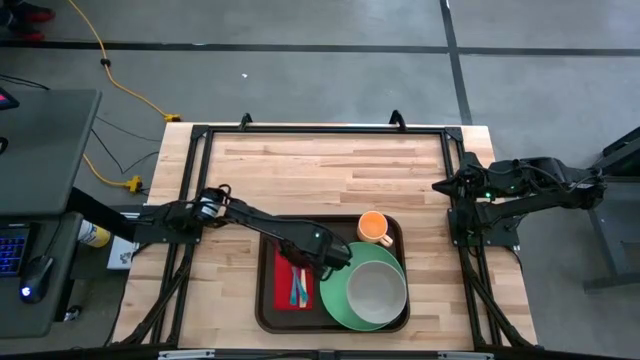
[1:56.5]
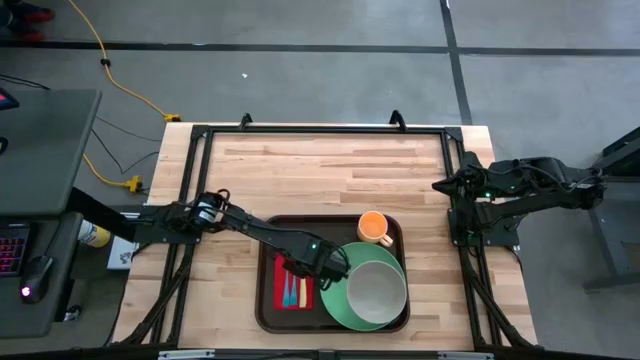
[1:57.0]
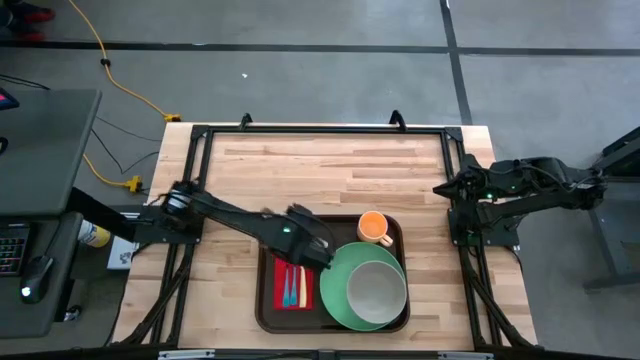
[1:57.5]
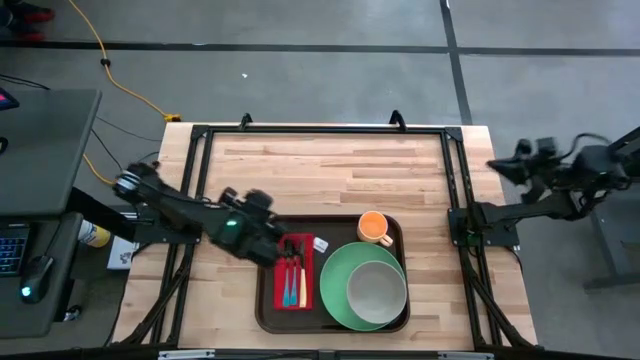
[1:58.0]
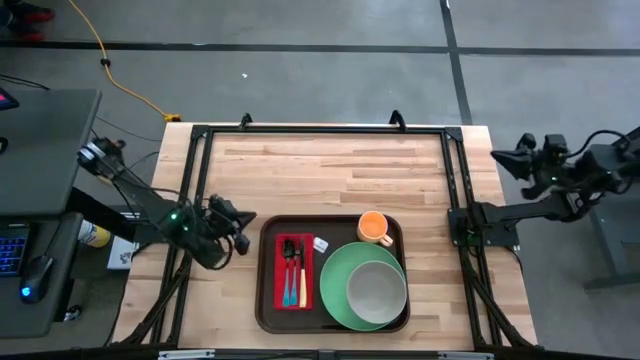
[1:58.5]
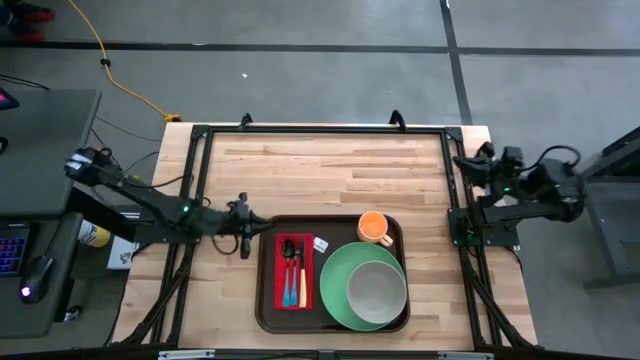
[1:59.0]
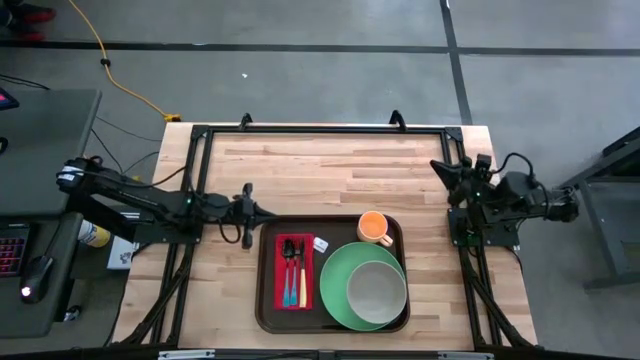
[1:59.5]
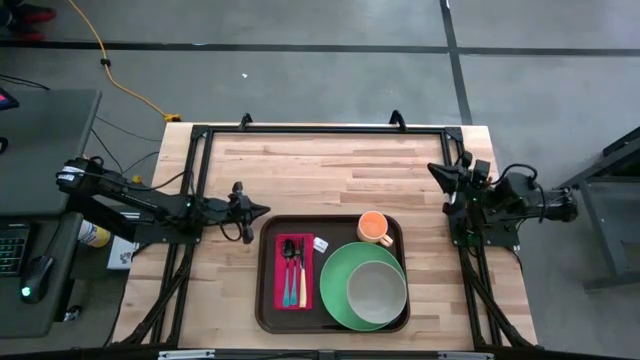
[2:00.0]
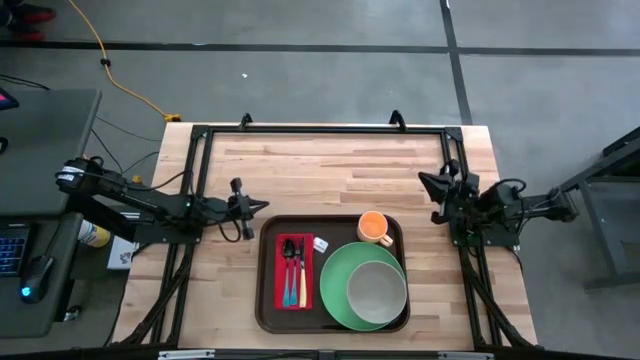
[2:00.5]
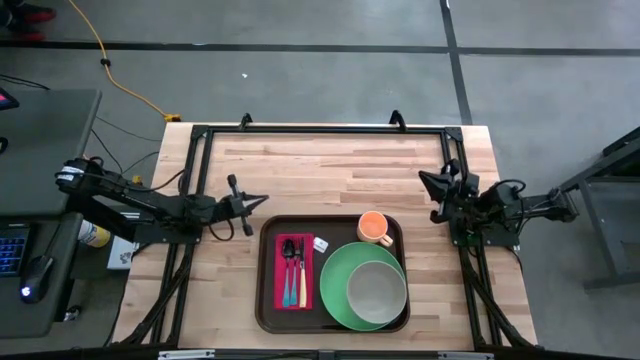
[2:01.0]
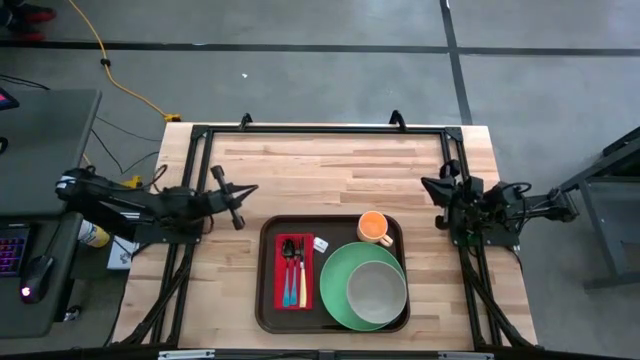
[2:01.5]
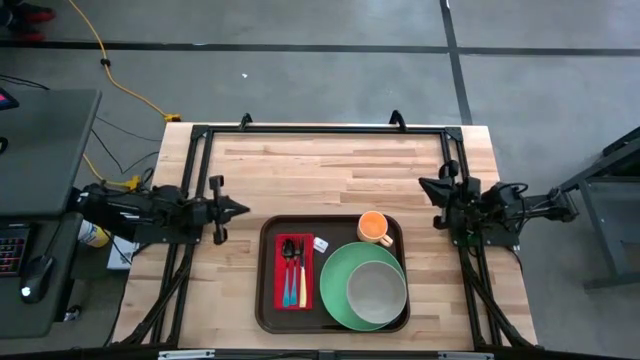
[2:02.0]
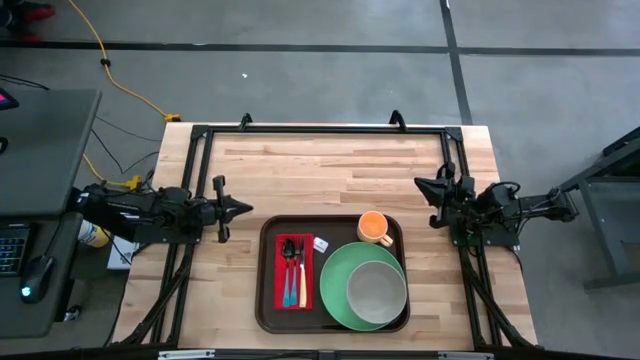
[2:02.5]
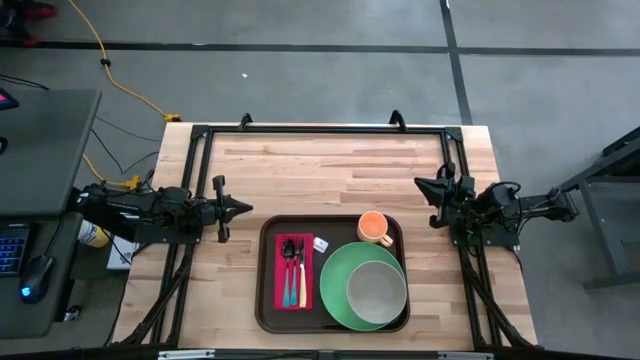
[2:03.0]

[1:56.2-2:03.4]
Task: Set up tray
Return to Home Position

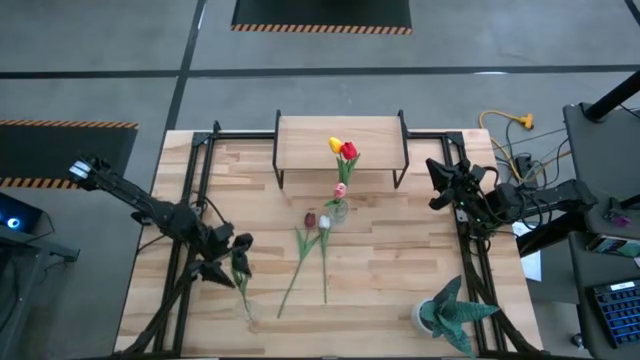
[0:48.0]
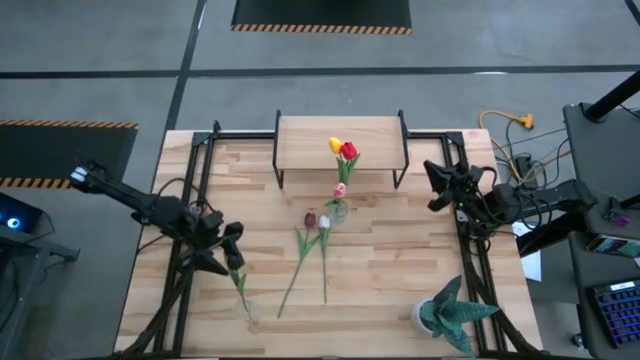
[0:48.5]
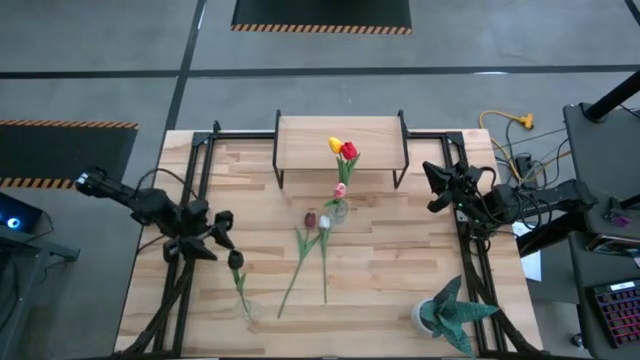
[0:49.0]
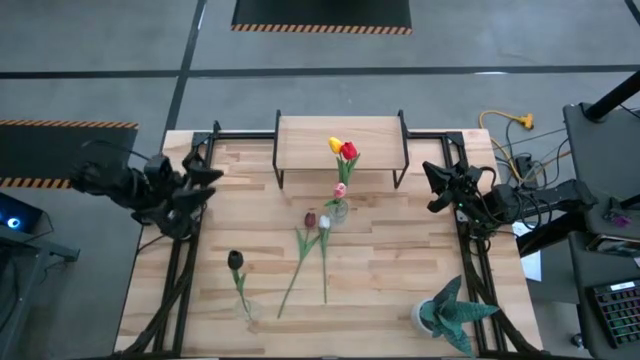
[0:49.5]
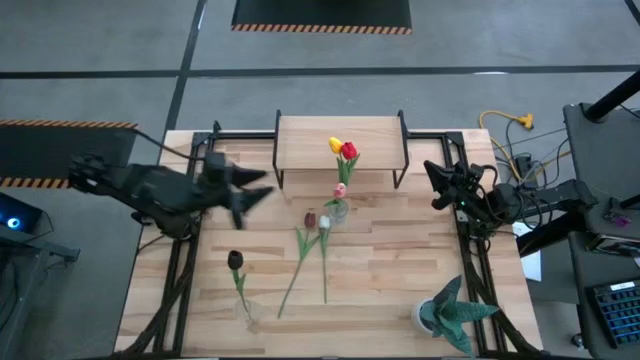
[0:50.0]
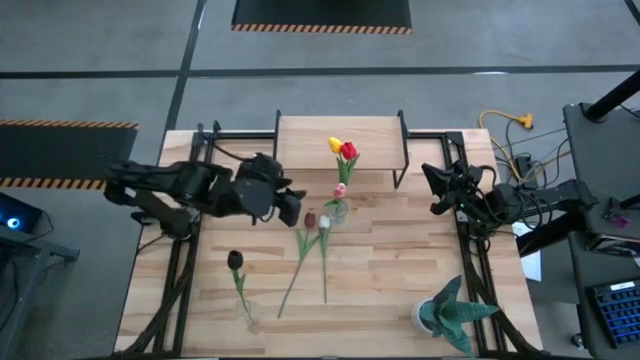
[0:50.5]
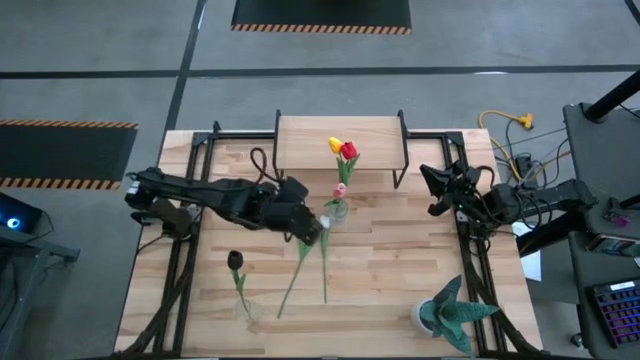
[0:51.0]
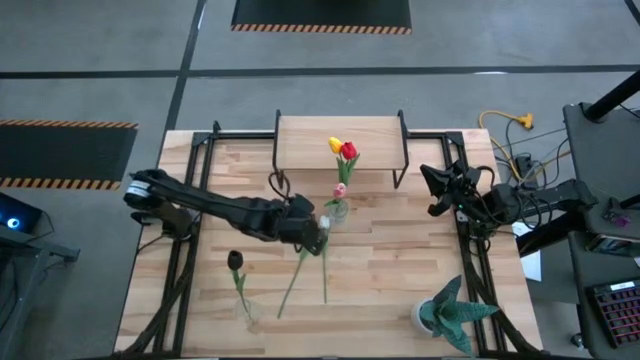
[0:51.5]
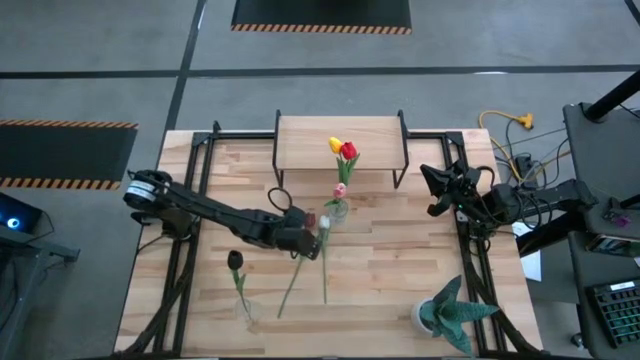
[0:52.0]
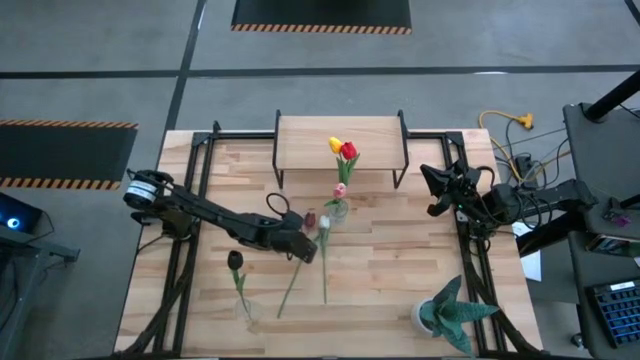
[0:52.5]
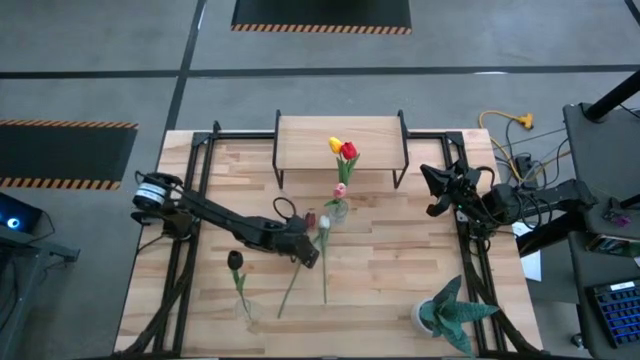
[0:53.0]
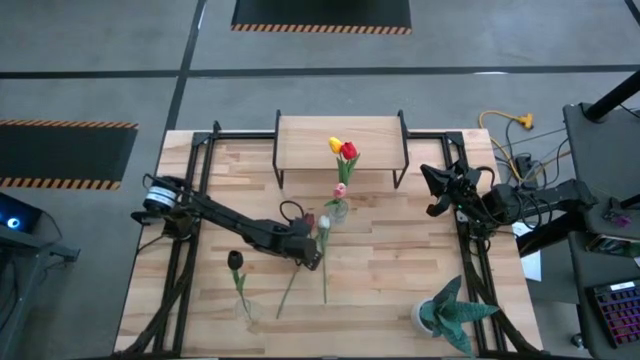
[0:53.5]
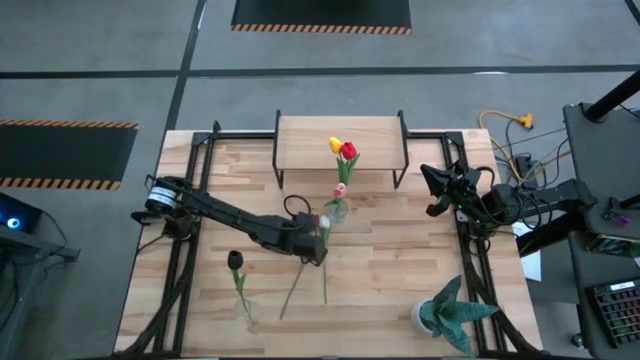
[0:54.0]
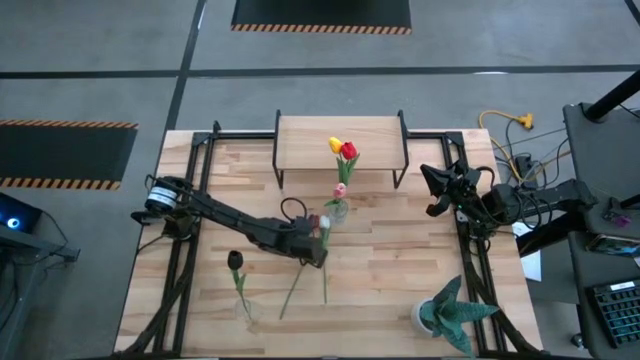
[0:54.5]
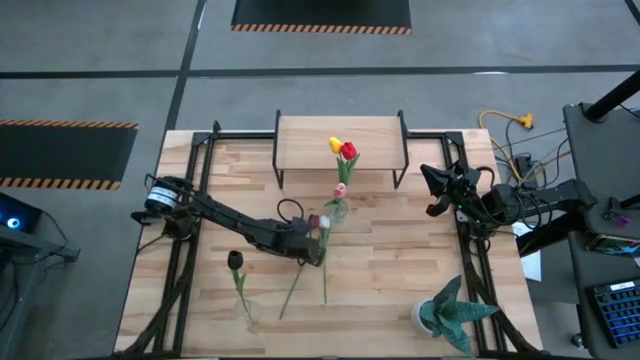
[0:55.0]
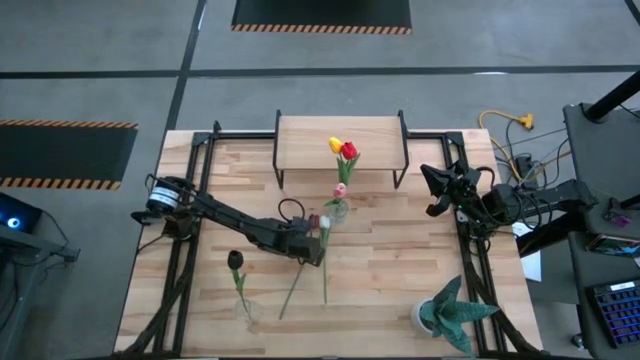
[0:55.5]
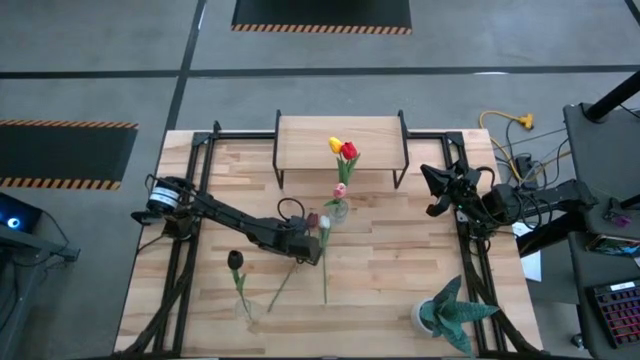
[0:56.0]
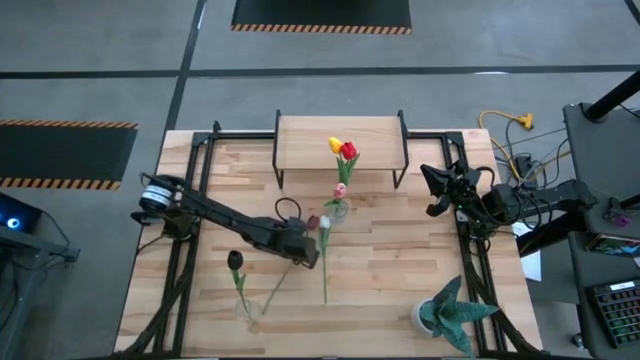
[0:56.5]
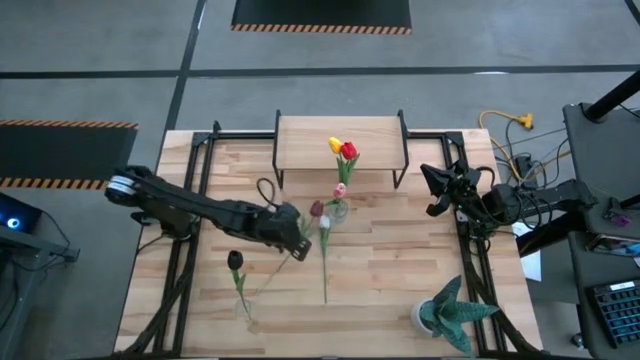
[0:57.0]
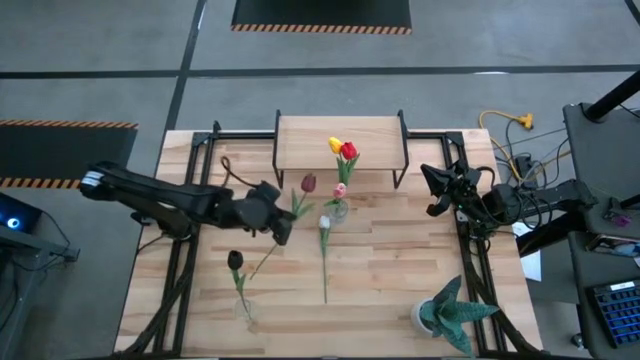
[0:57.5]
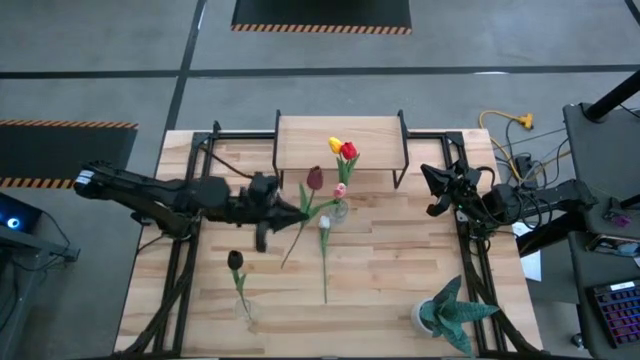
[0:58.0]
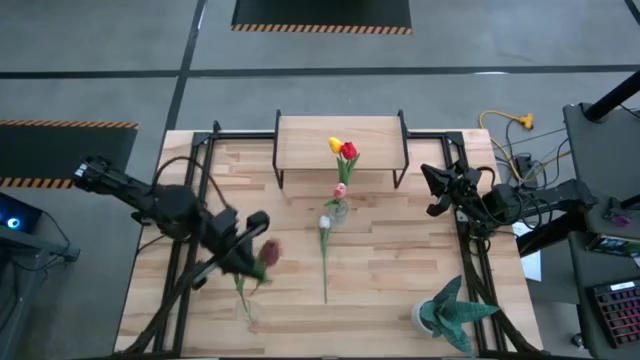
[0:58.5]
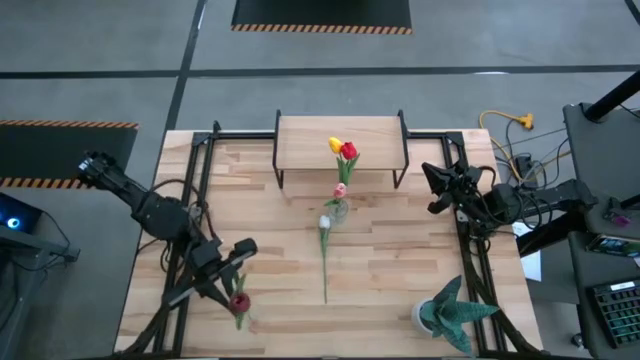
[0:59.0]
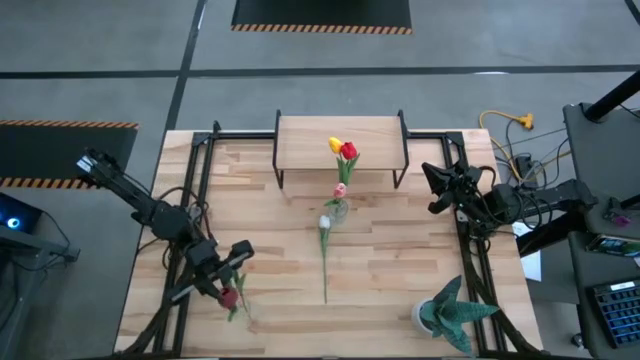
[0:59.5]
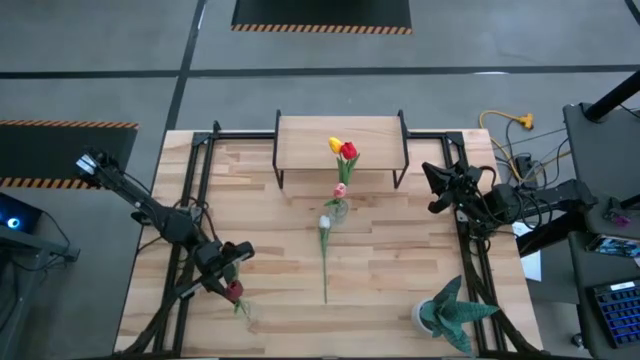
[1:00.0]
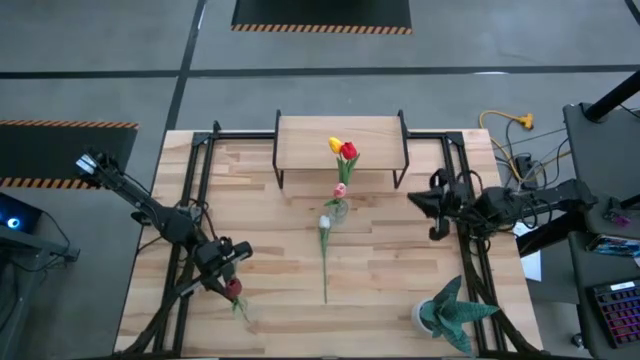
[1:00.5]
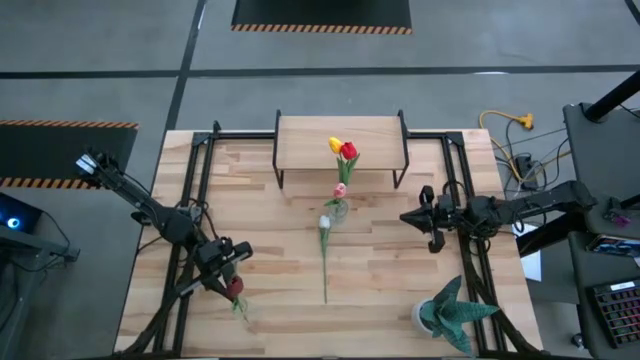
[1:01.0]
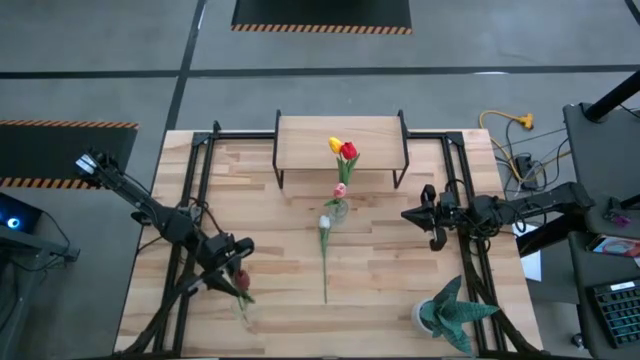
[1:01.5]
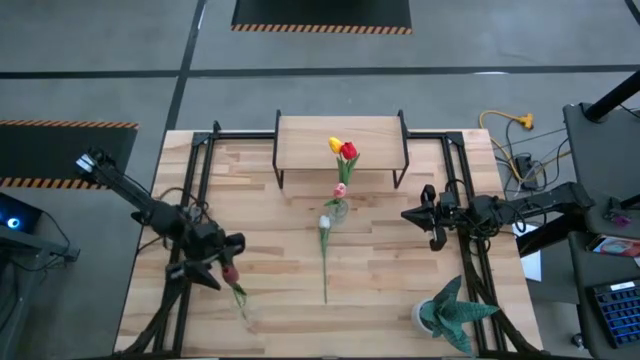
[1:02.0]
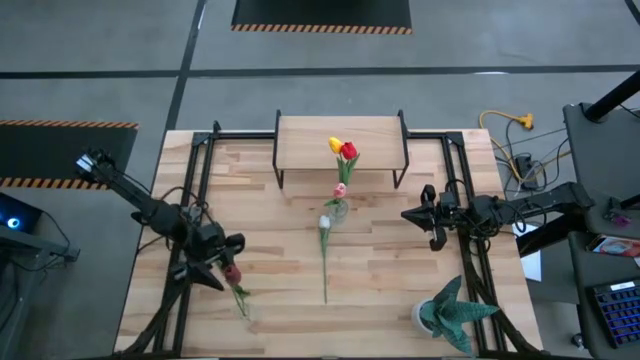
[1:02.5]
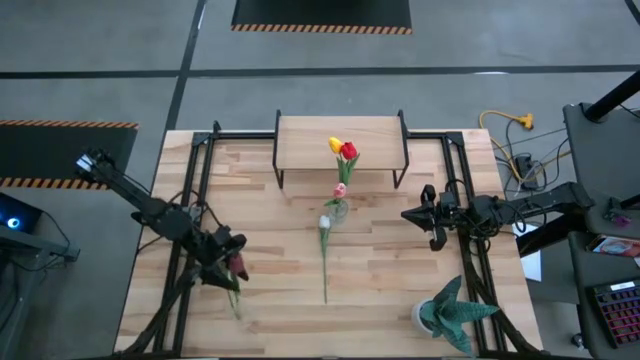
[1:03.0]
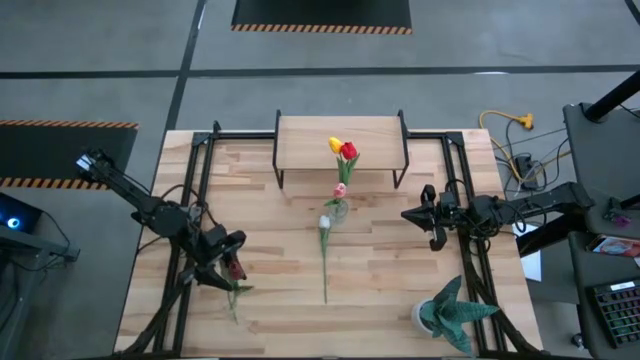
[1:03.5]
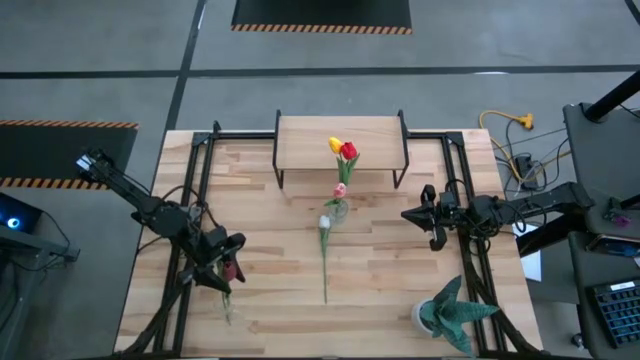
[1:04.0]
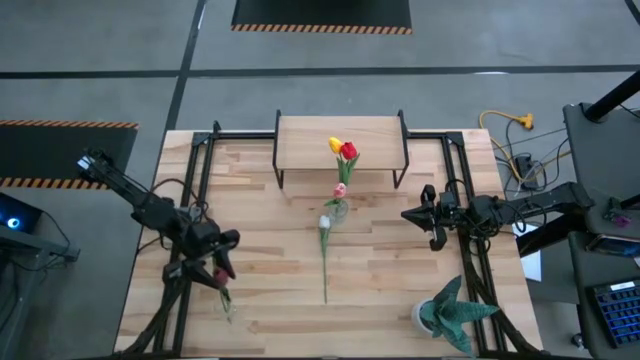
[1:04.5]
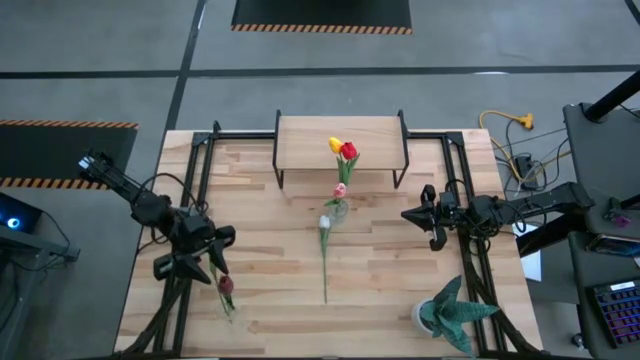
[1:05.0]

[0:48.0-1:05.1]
Task: Pick and place flowers into a vace then onto a shelf
Put the maroon tulip into the bottom transparent vase
